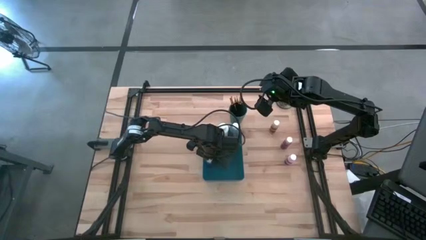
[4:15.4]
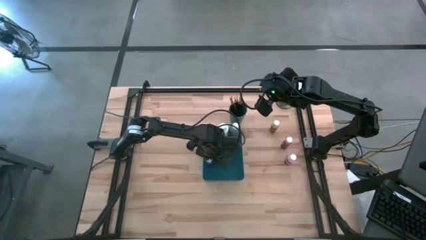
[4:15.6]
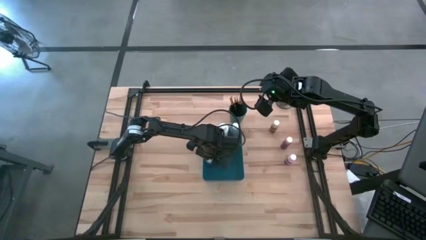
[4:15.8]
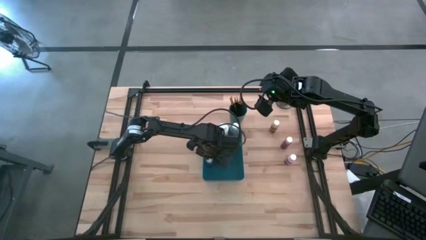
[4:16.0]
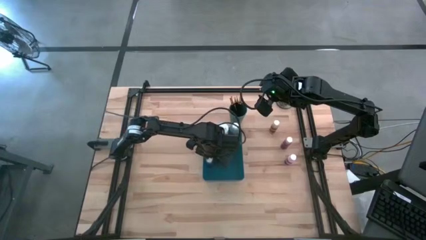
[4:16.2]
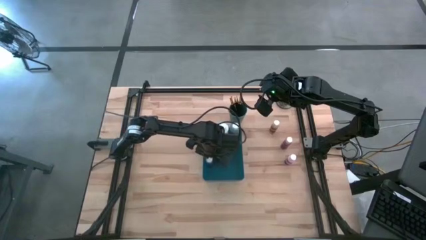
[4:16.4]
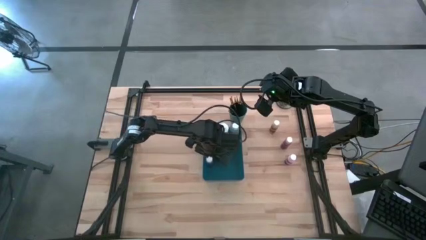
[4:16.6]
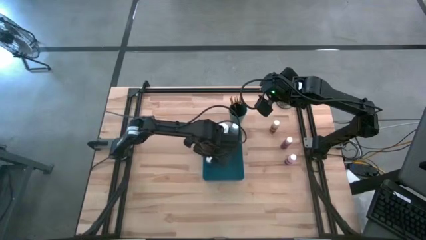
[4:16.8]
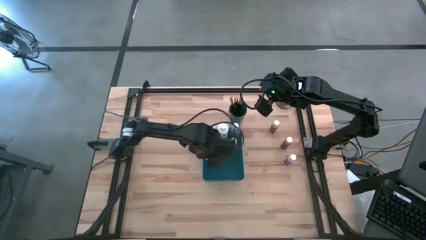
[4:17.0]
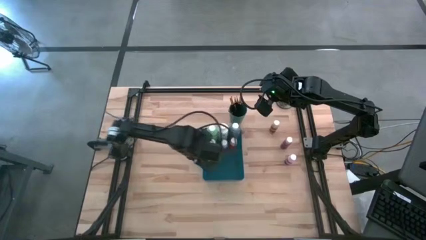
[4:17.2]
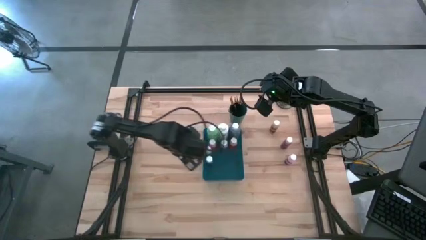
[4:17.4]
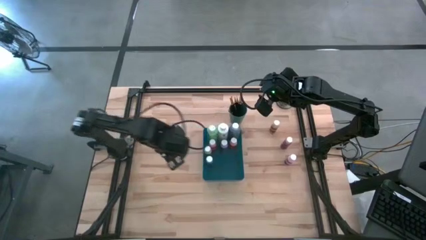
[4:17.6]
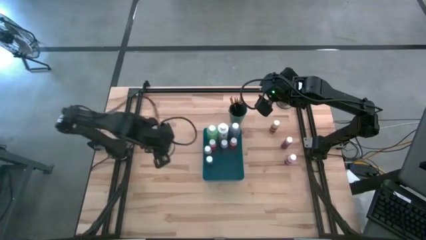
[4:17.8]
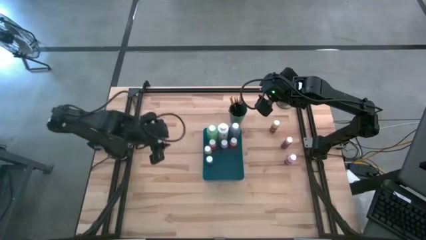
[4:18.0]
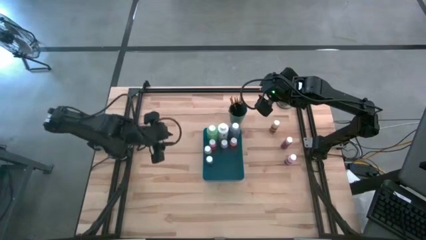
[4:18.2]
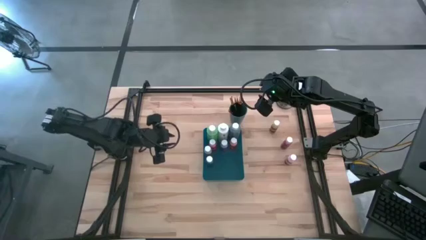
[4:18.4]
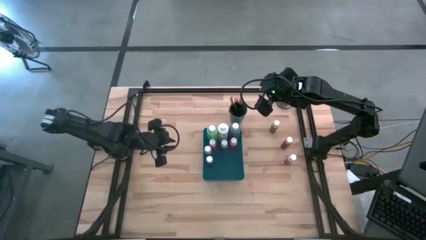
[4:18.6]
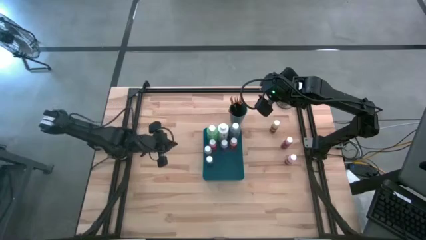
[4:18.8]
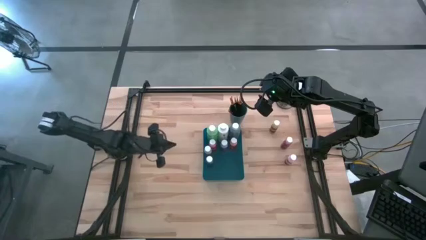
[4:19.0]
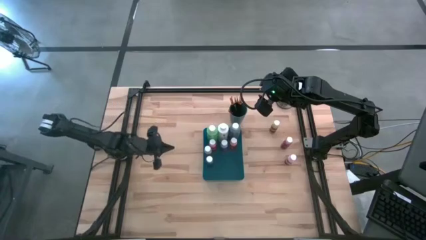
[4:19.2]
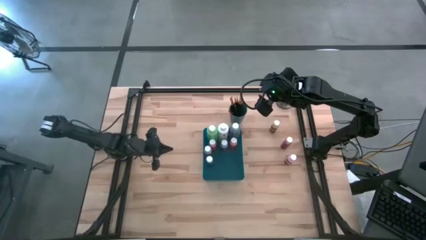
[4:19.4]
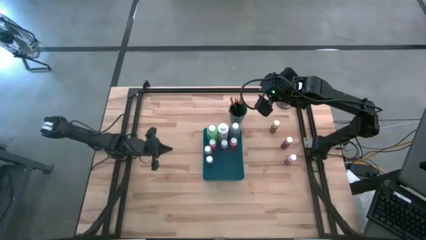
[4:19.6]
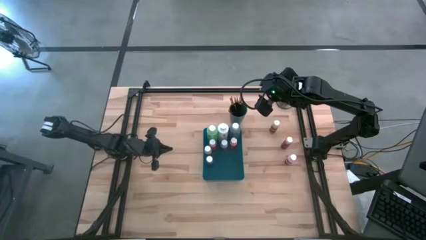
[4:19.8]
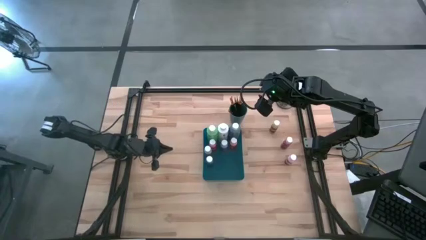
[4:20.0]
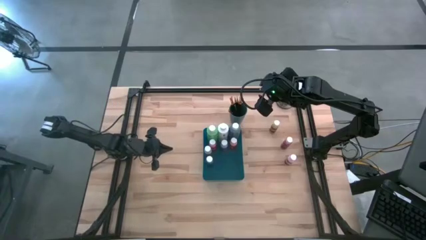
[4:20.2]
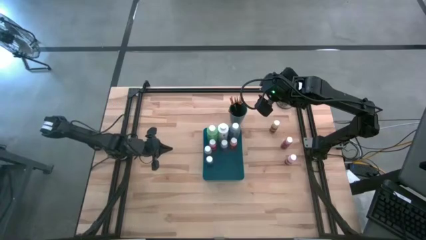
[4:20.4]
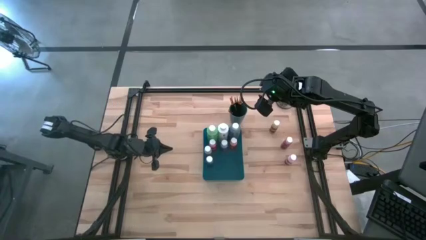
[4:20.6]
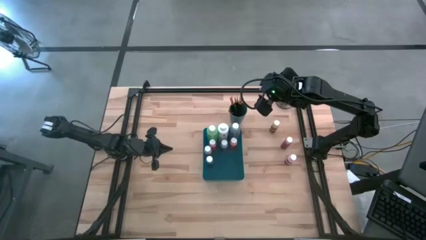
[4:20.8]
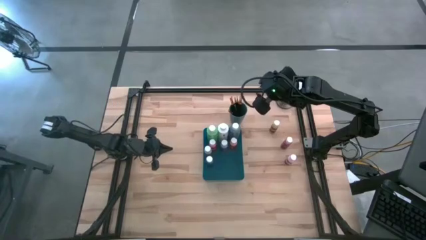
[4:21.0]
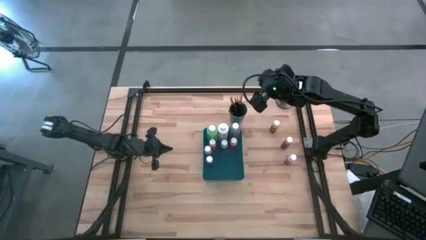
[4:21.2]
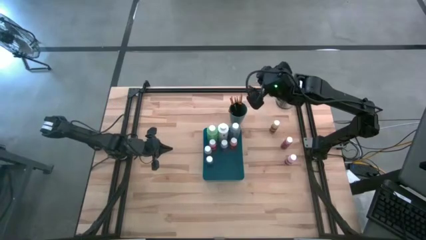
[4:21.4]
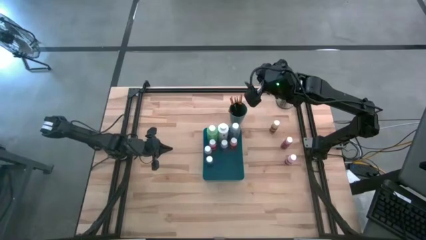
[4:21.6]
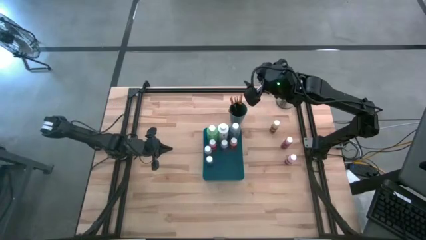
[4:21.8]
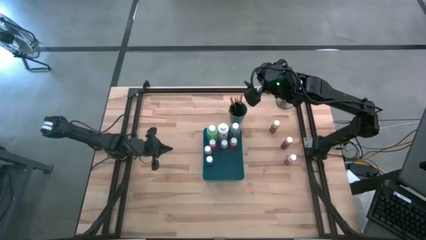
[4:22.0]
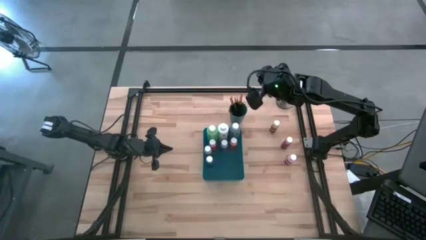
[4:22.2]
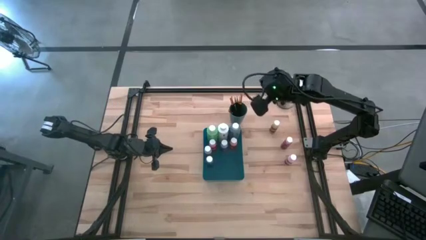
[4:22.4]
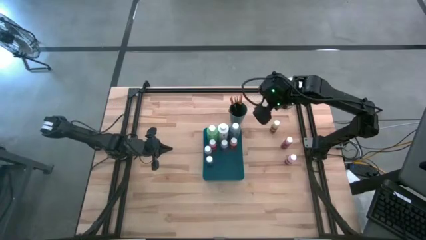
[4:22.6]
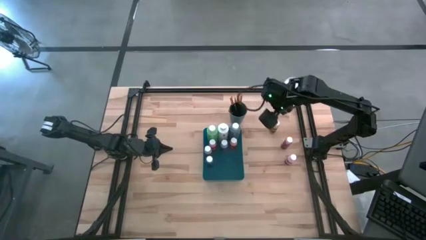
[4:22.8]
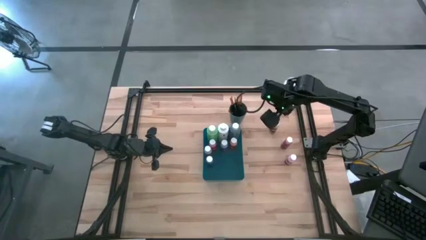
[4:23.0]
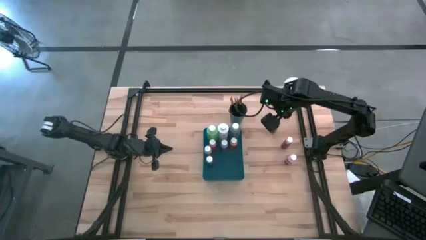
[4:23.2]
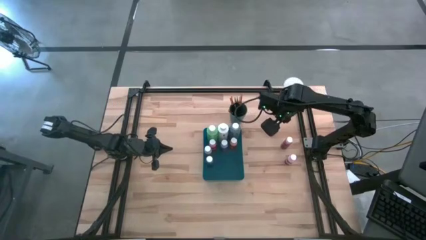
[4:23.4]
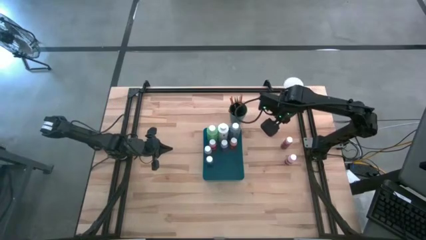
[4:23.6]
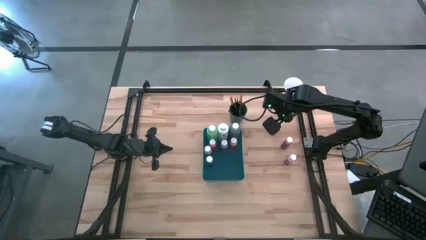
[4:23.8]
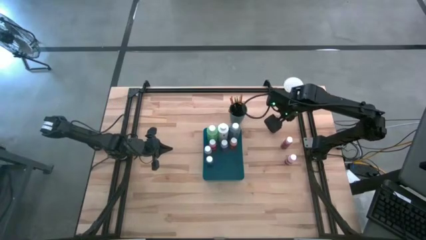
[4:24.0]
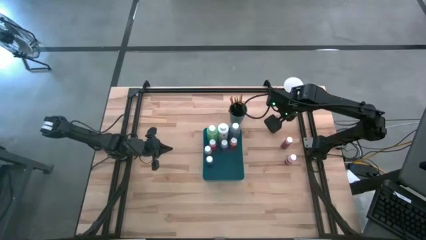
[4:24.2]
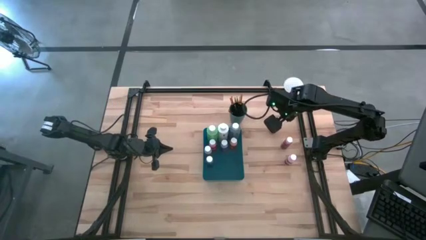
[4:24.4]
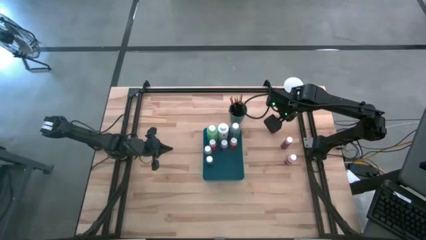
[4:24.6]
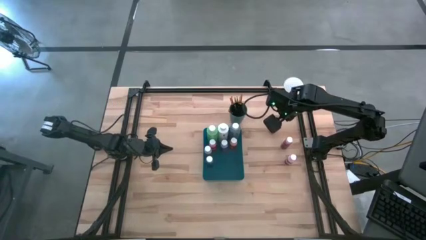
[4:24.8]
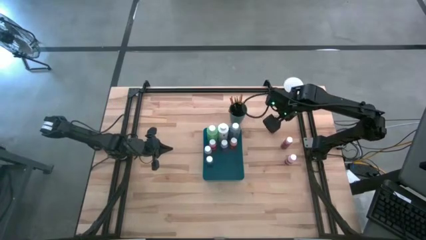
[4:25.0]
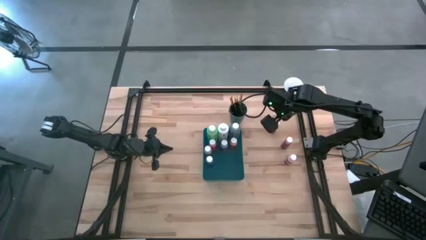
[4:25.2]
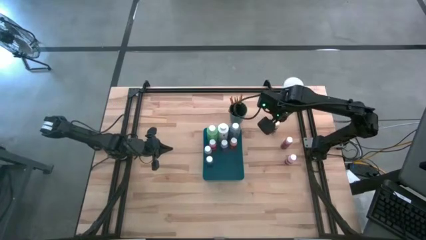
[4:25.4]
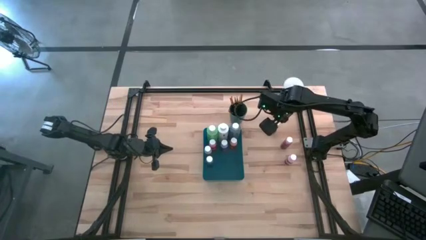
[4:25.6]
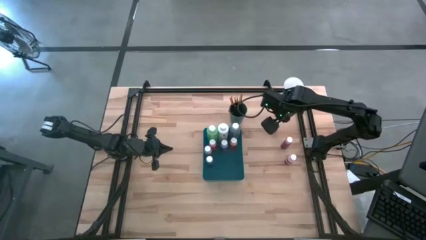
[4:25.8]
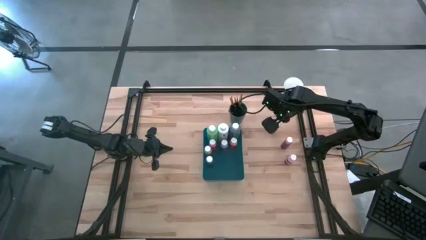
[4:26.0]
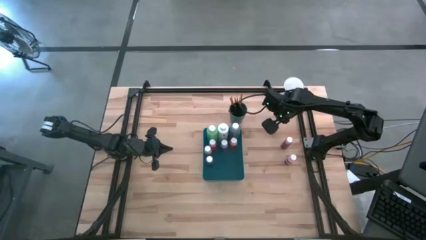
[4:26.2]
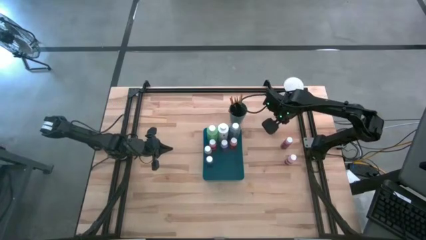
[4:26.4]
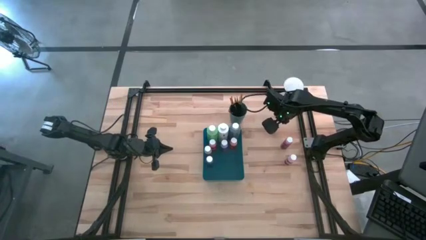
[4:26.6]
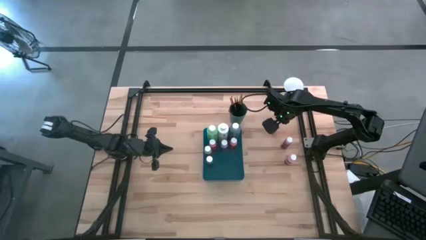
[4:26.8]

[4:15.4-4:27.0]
Task: Pick & Place Paint Supplies
Put the small yellow paint bottle into the blue bin

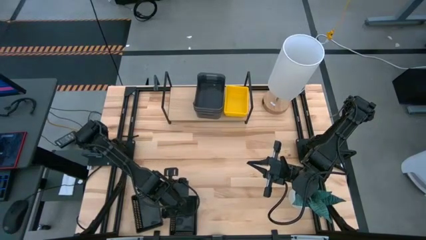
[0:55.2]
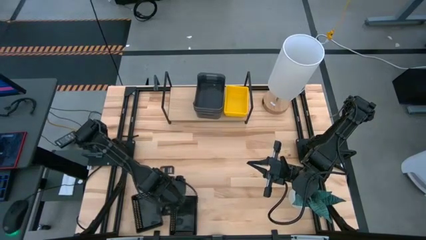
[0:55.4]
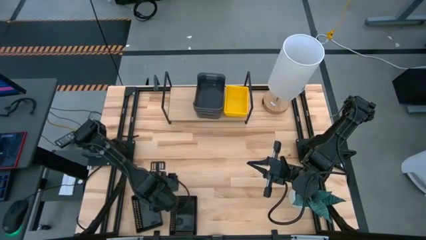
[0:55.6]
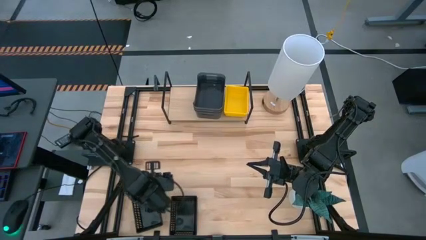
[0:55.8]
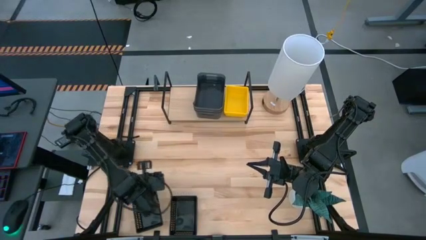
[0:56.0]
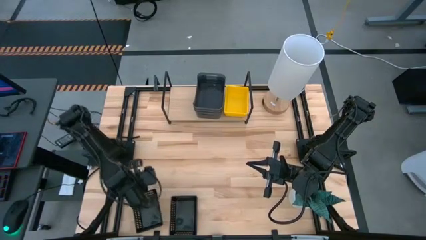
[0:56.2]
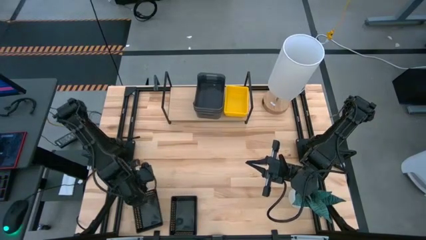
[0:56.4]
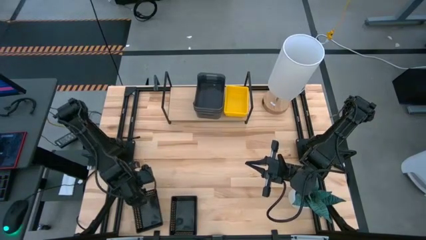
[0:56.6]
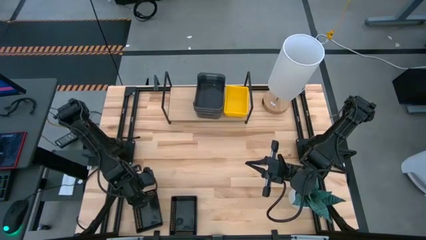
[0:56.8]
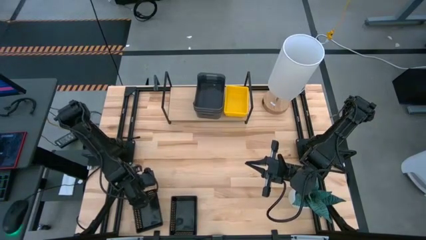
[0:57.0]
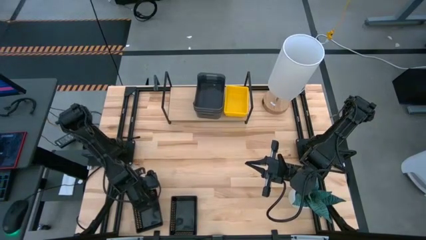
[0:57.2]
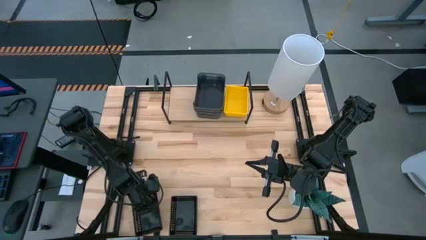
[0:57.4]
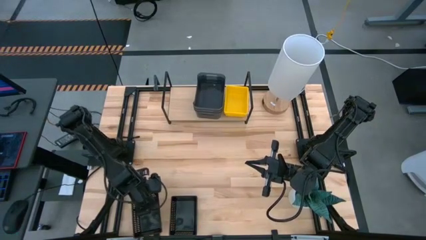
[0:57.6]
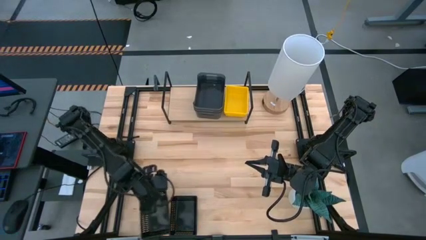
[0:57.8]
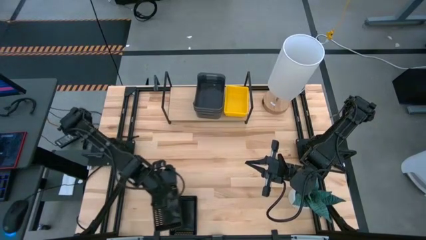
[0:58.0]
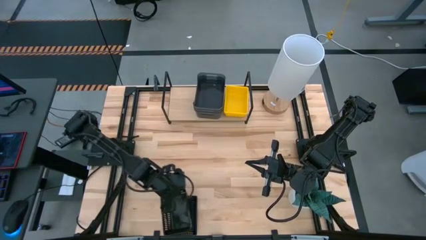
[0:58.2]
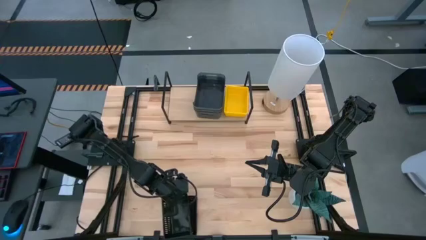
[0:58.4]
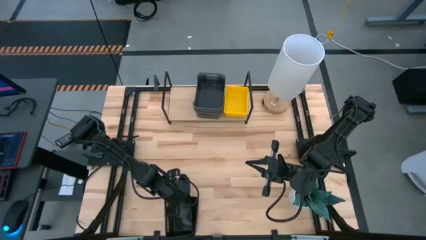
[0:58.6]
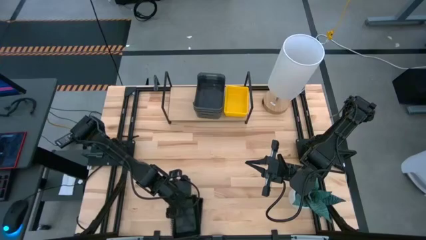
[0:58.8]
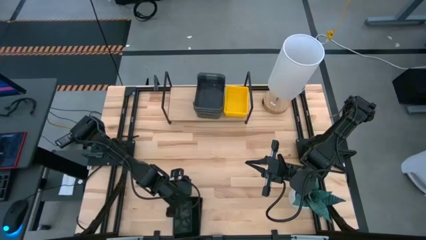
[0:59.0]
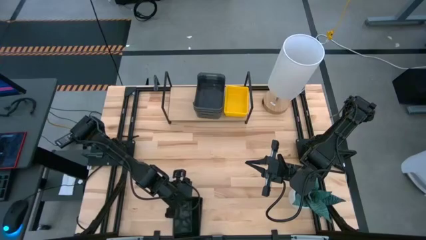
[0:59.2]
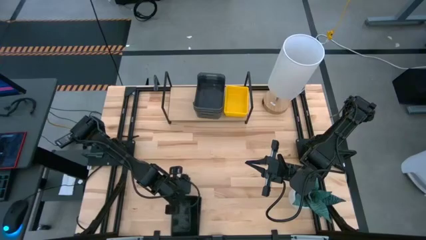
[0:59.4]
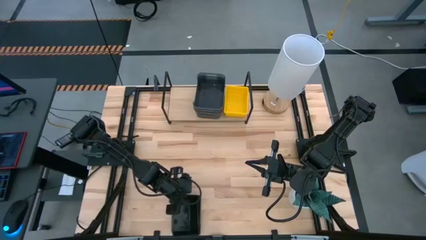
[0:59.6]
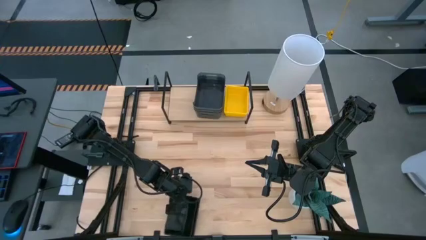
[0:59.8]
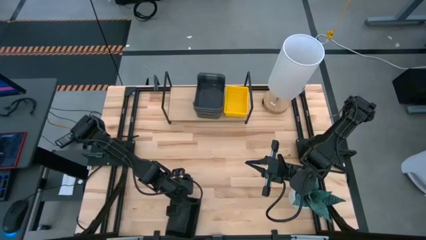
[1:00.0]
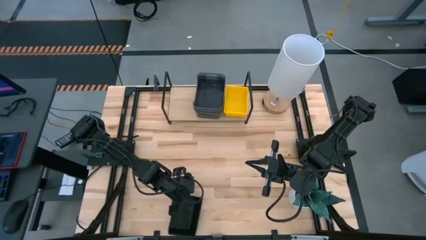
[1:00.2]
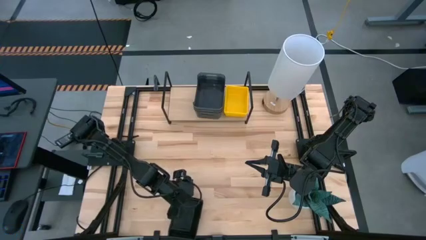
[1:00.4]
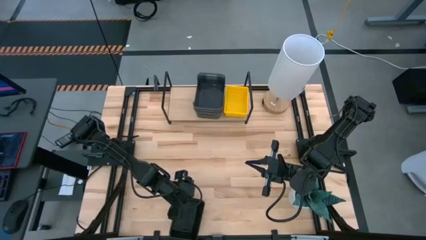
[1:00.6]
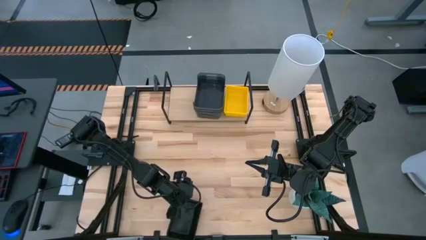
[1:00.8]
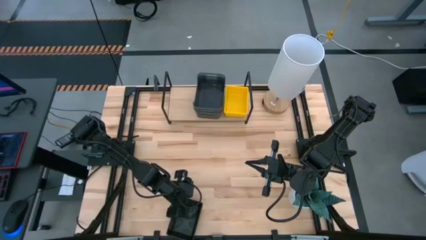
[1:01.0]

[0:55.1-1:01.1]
Task: Stack baskets on shelf by color
Stack the left black bin on the black bin
